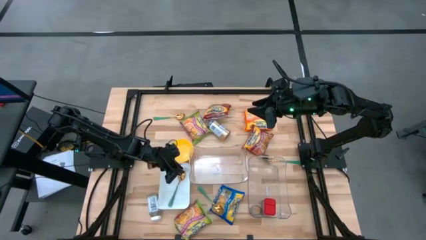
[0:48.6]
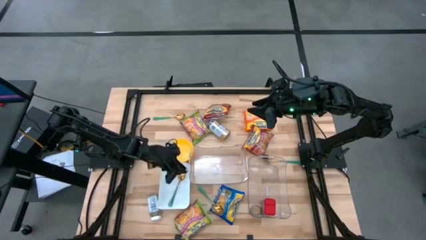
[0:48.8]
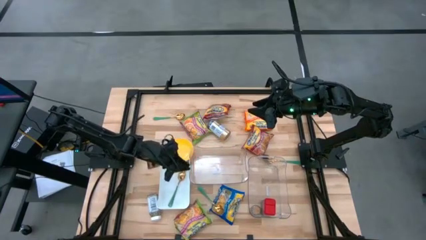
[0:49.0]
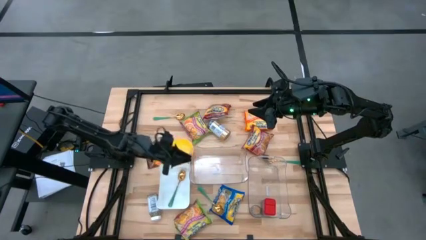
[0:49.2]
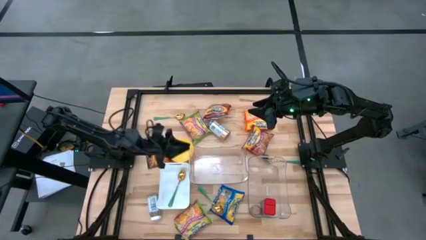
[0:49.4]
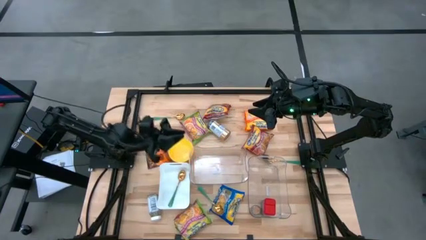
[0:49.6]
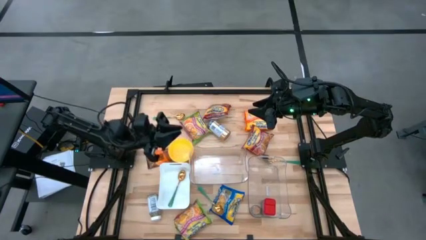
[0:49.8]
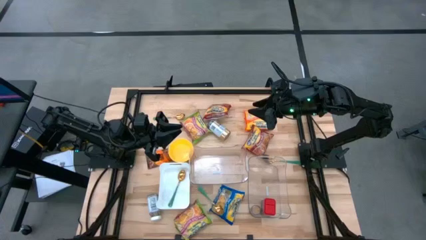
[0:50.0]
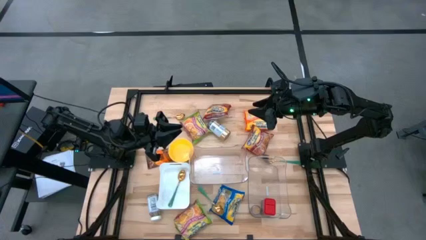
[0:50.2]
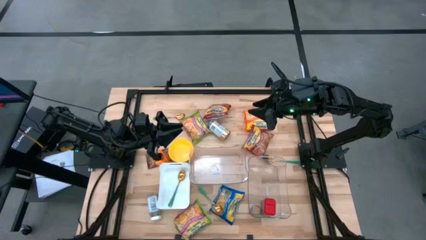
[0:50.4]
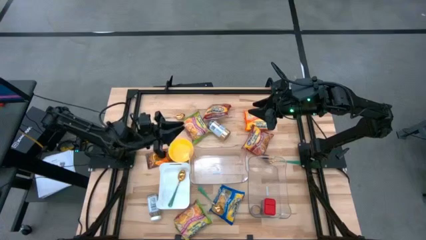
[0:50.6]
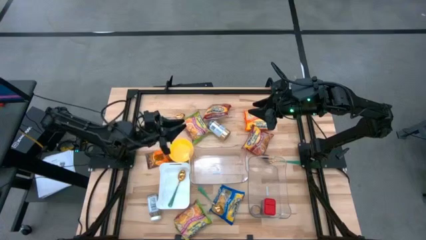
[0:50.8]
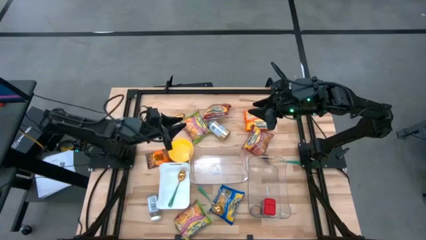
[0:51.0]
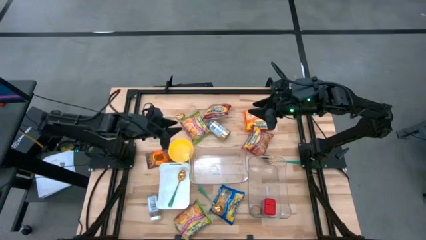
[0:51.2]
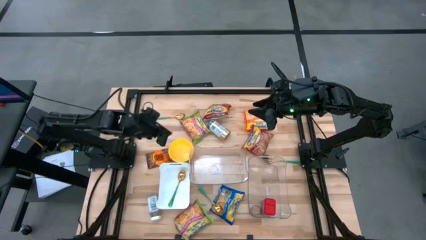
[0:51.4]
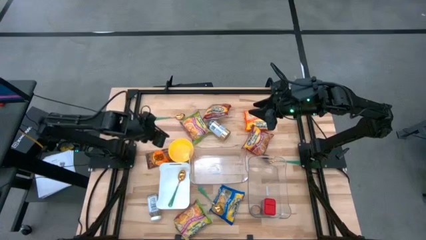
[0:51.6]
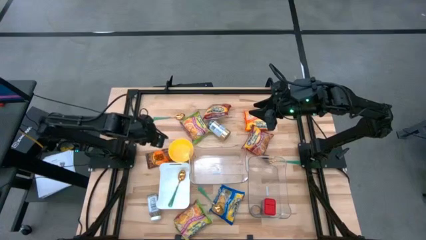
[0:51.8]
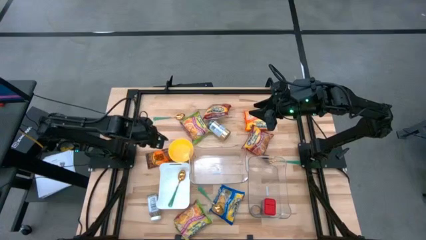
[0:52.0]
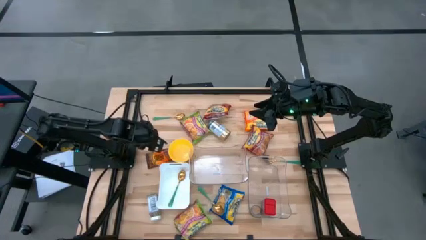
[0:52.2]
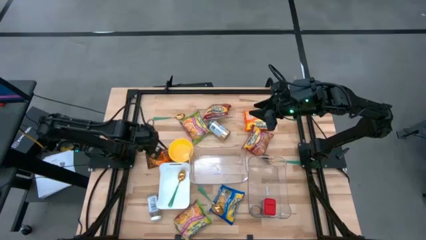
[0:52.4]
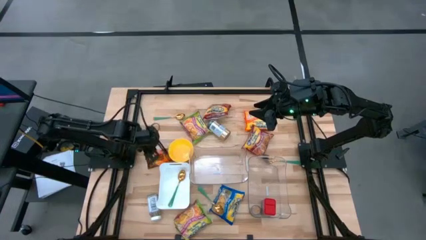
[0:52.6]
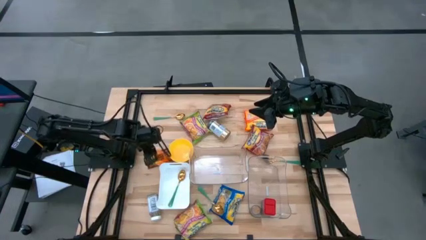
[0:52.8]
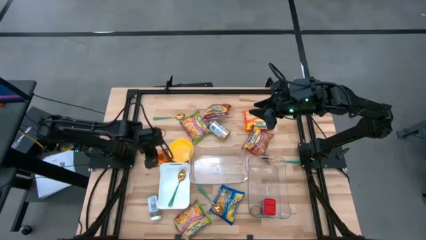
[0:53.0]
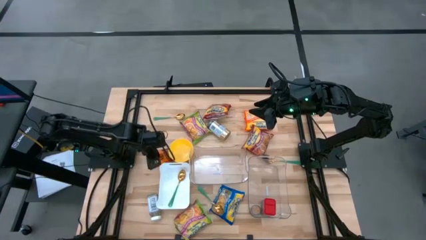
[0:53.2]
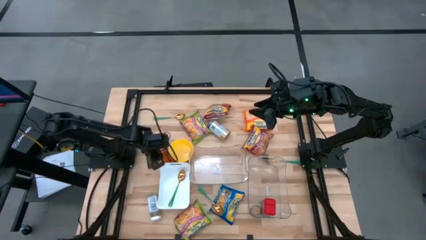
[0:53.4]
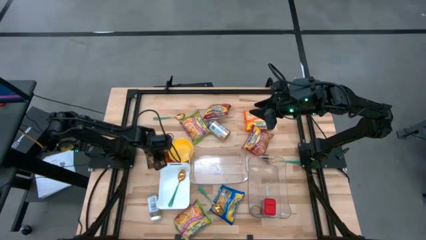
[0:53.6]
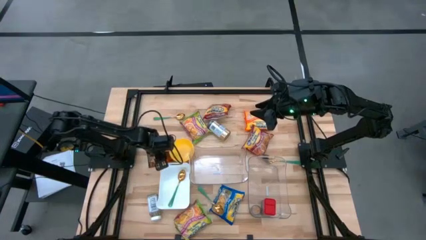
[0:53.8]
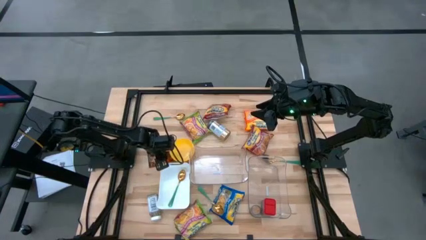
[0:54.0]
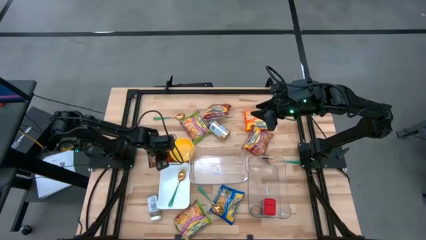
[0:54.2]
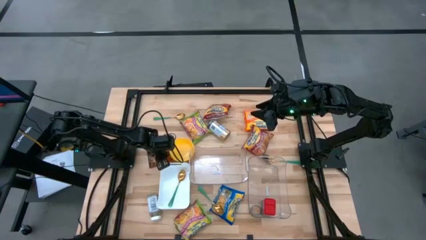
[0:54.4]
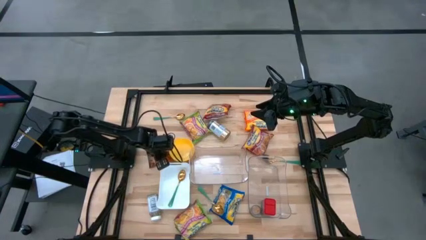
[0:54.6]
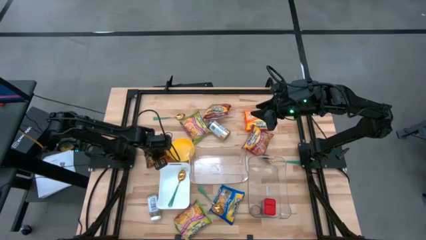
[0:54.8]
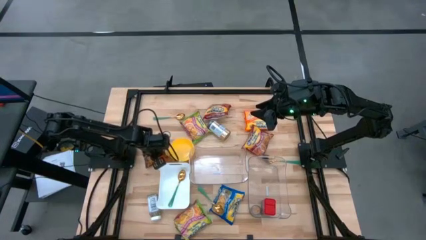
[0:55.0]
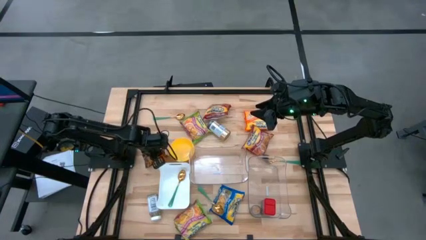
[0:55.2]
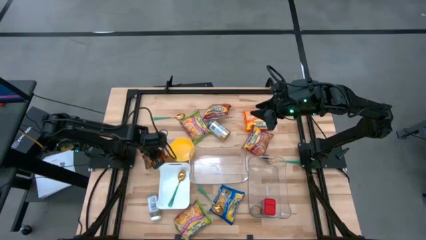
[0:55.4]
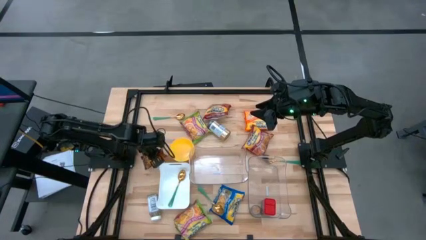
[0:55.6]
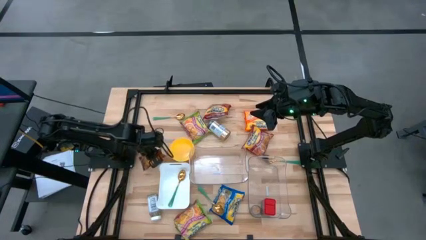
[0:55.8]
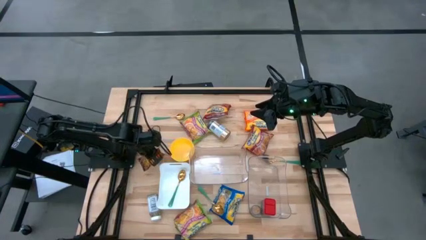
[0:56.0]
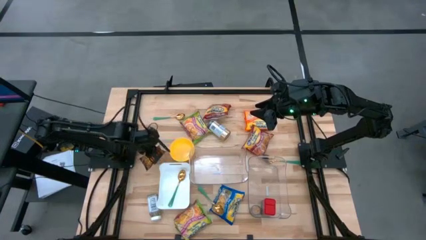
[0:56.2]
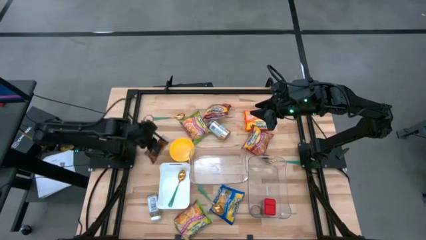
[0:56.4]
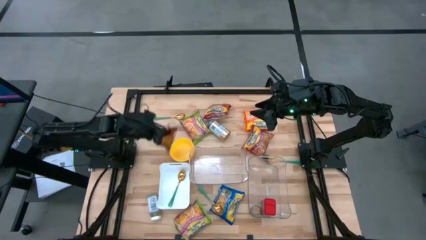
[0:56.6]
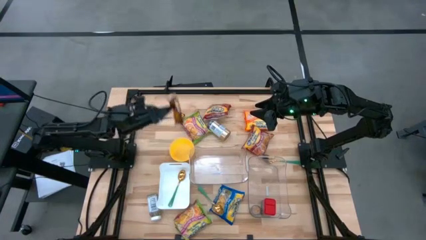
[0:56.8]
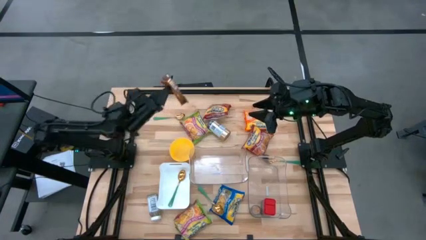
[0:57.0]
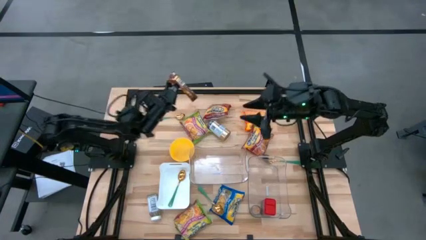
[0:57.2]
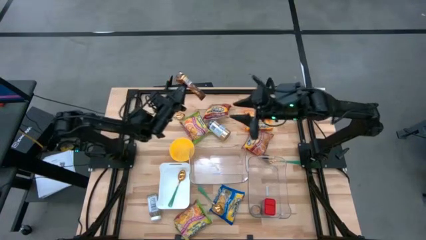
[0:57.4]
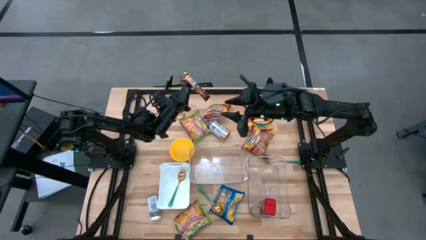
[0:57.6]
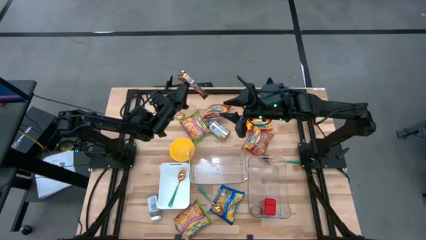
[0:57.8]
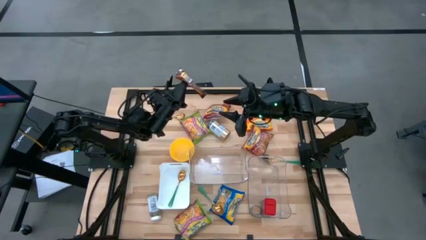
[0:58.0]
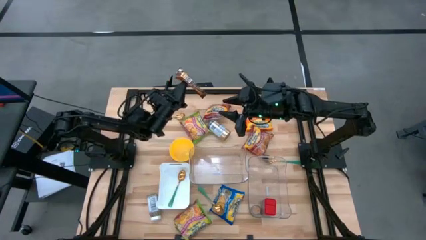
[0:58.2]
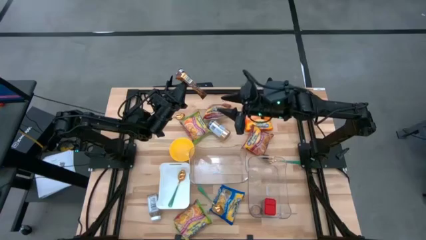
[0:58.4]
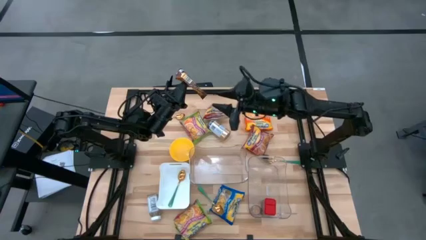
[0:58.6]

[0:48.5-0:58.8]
Task: Pick & Place Food Item
Put the orange seasoning pack into the right transparent bin

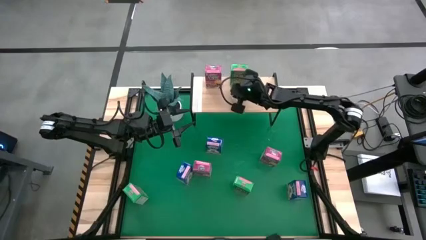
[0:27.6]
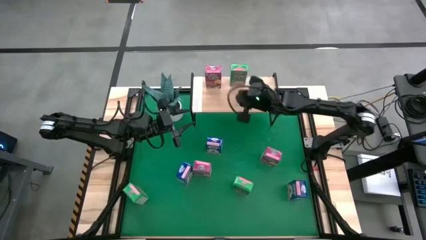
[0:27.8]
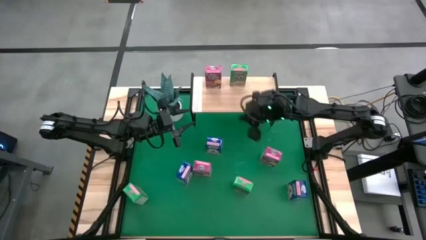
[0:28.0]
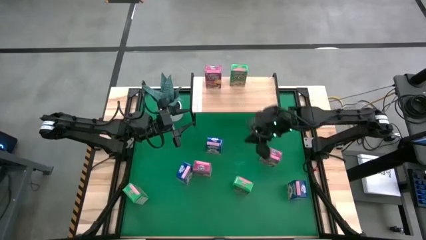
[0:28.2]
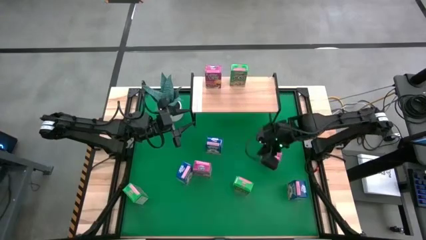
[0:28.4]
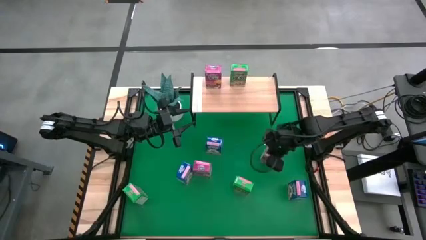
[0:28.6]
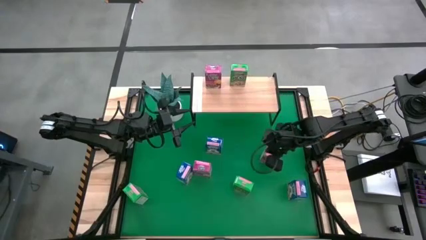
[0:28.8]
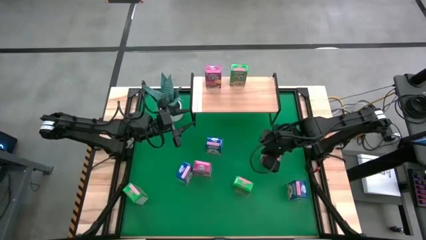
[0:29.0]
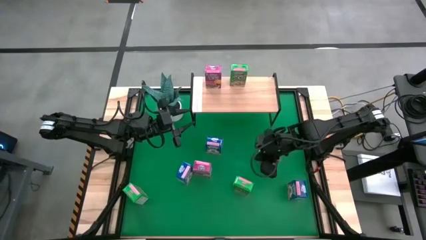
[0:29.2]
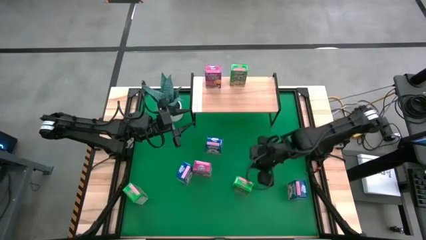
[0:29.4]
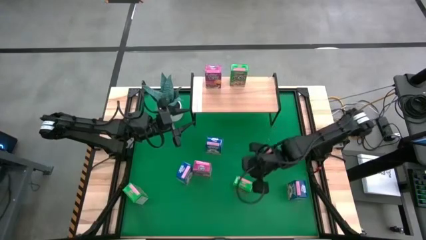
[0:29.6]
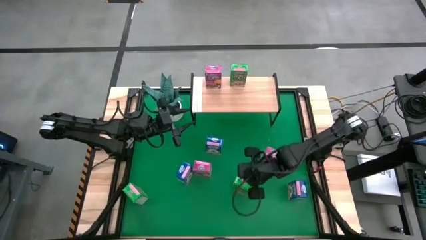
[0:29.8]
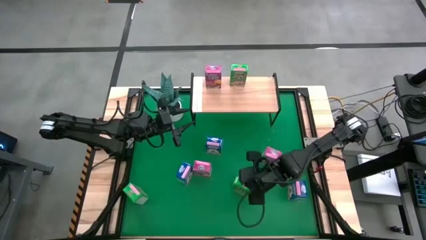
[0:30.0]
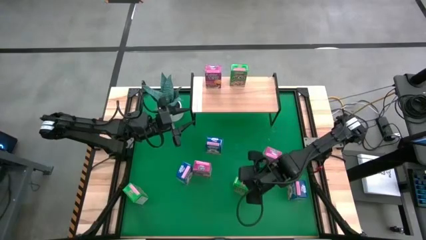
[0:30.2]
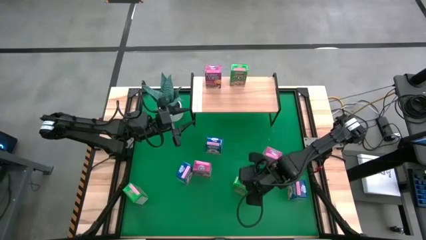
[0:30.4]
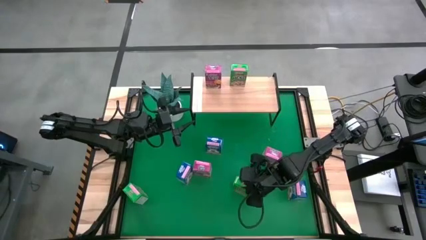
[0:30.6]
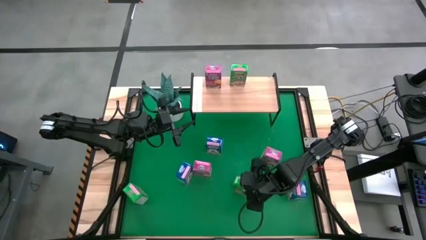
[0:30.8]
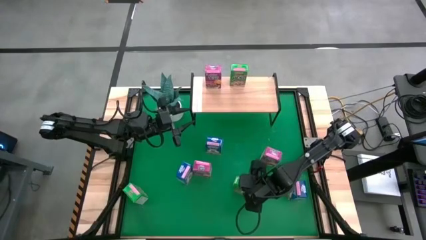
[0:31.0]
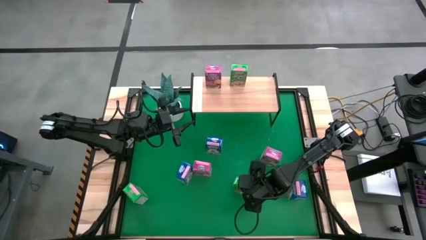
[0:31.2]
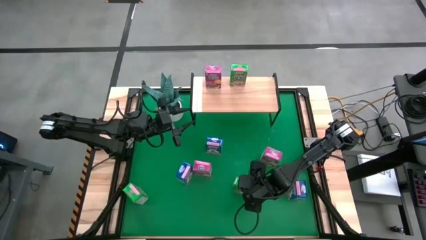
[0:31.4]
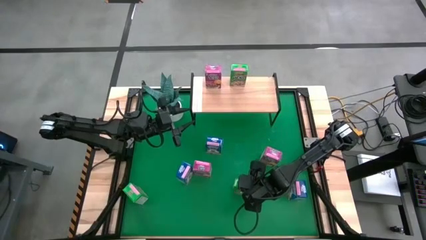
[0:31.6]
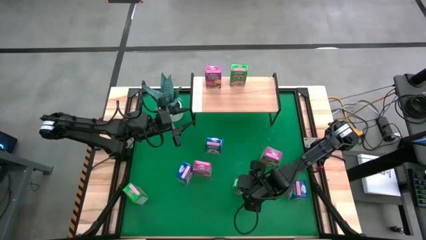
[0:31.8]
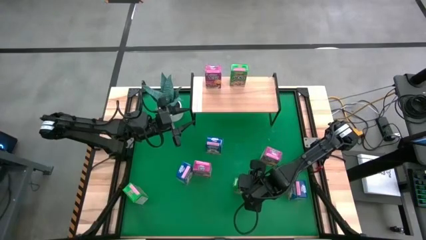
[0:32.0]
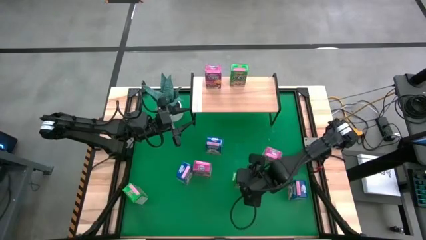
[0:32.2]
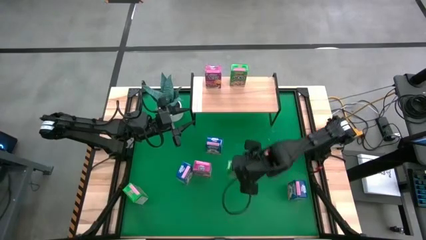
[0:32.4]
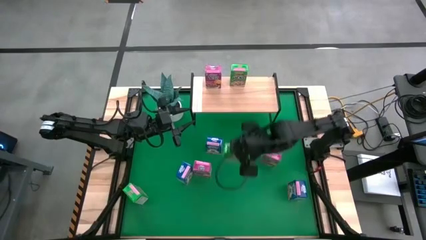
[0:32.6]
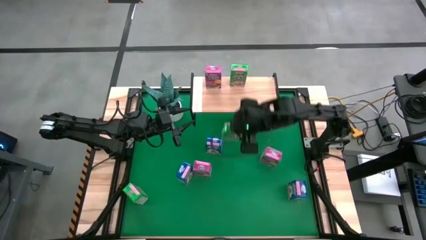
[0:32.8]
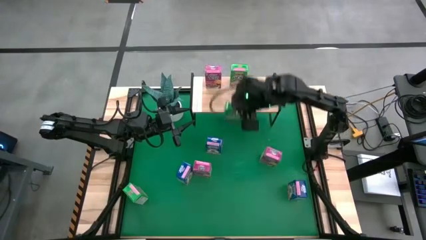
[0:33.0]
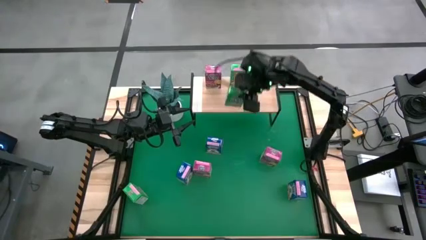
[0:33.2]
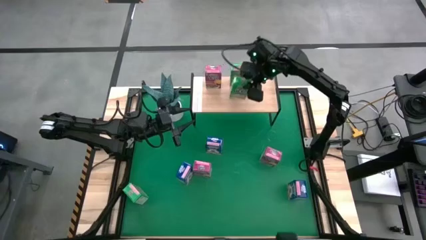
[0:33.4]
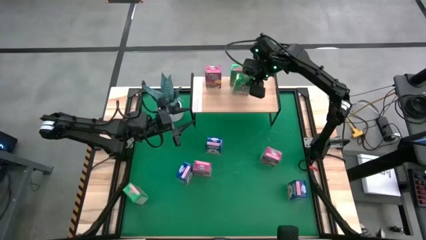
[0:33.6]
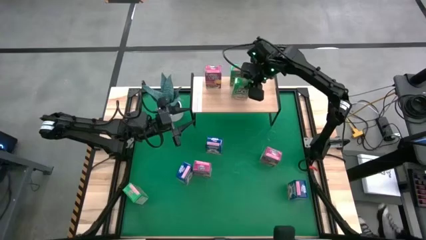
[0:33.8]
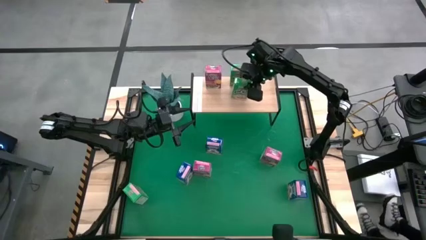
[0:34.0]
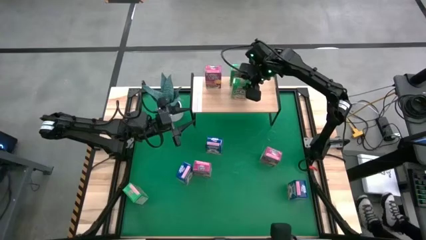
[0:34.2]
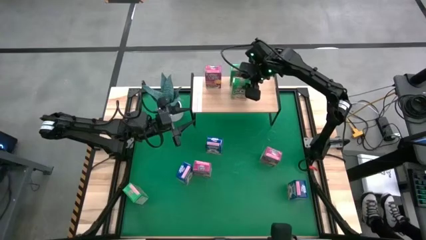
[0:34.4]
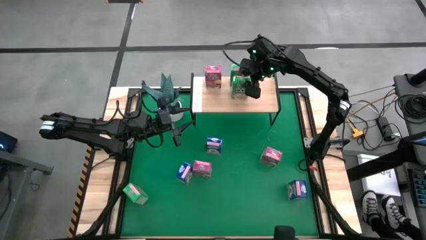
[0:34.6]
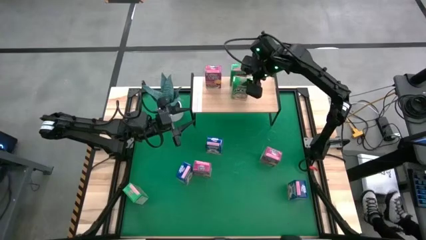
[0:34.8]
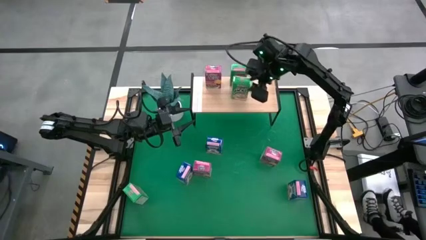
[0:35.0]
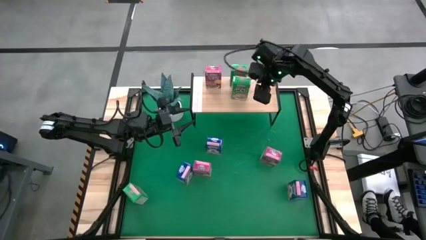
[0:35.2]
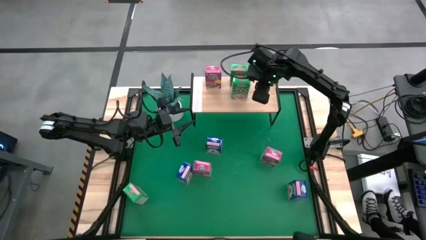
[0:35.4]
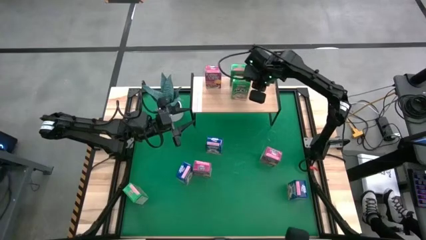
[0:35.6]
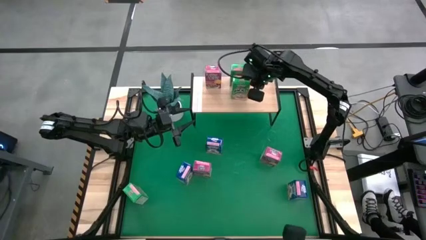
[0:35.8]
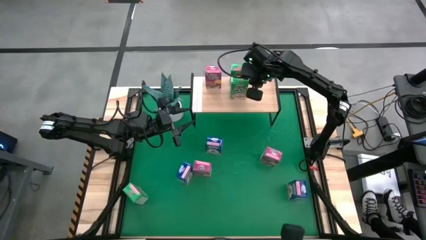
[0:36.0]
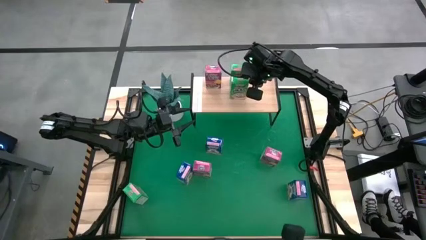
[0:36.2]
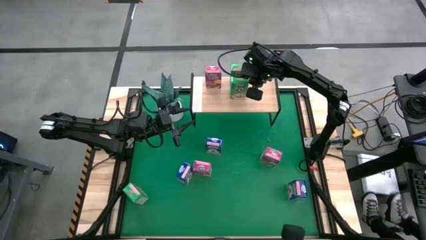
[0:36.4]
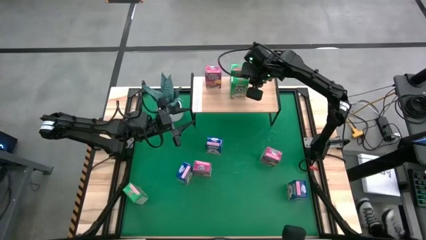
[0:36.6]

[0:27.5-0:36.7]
Task: Stack cereal on shelf
Put the right green cereal box aligned with the other green cereal box on the shelf
